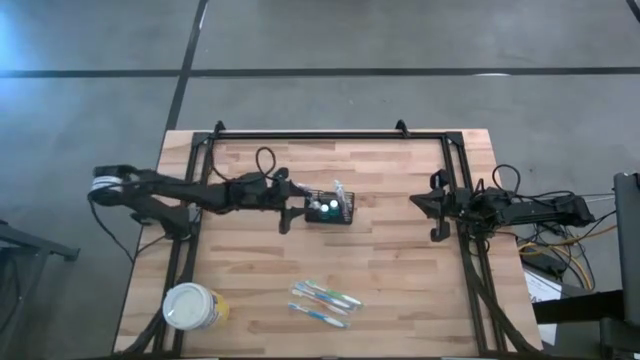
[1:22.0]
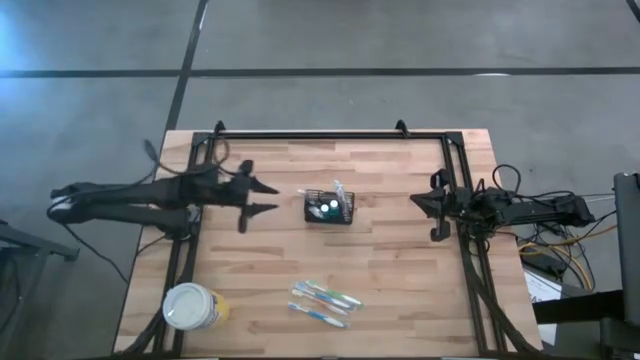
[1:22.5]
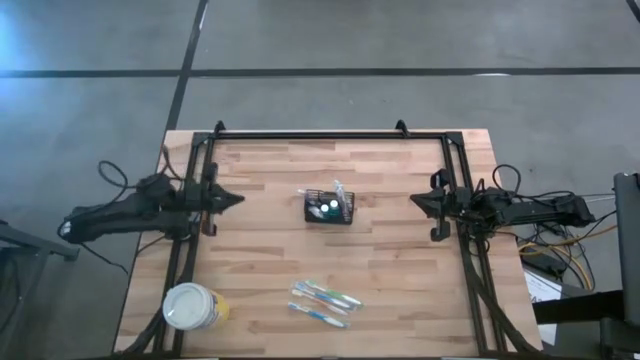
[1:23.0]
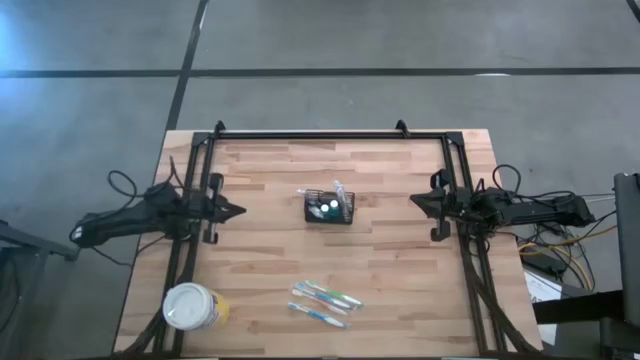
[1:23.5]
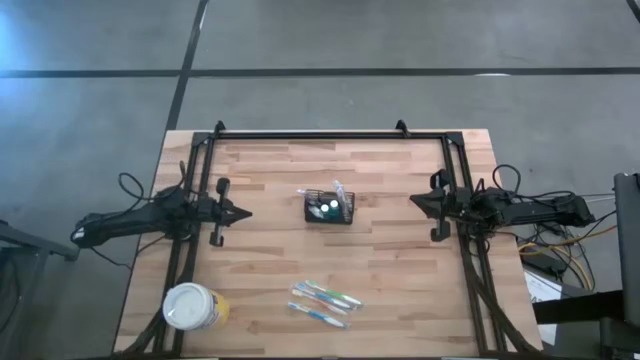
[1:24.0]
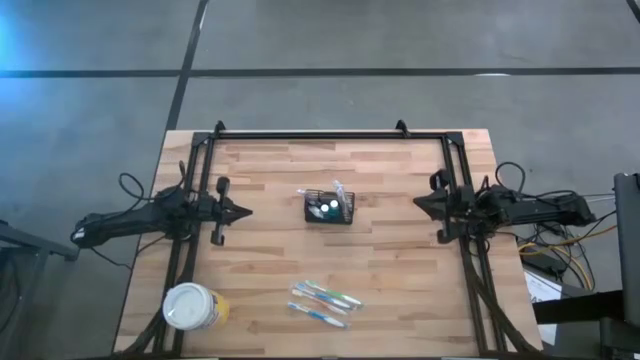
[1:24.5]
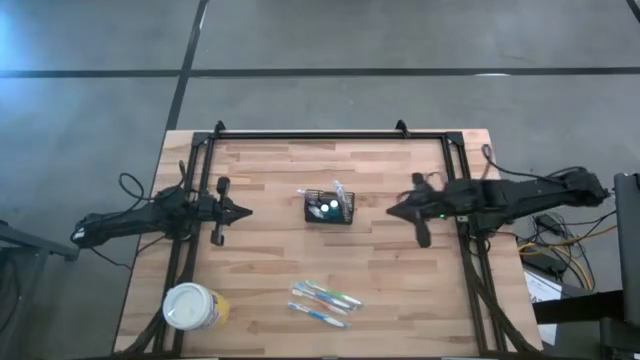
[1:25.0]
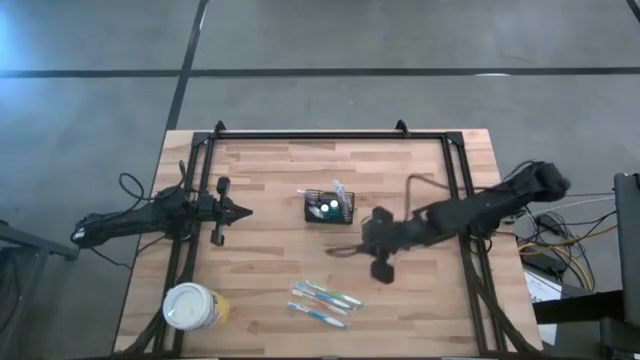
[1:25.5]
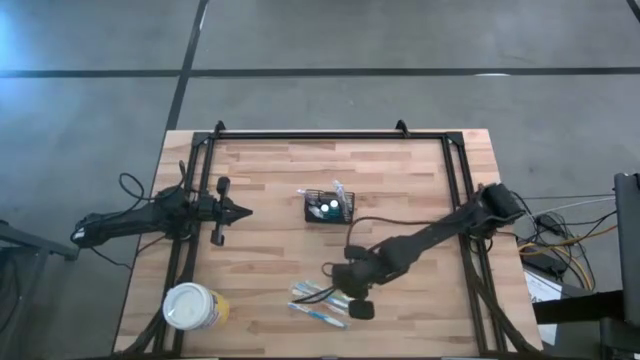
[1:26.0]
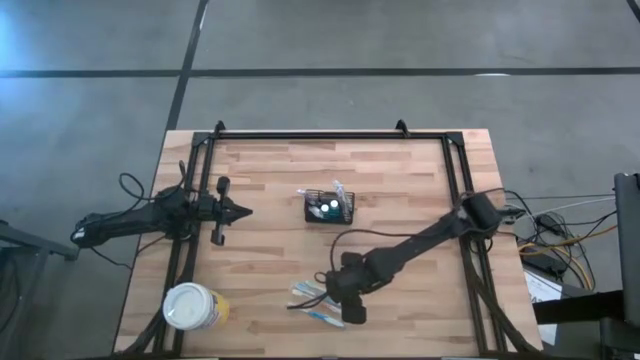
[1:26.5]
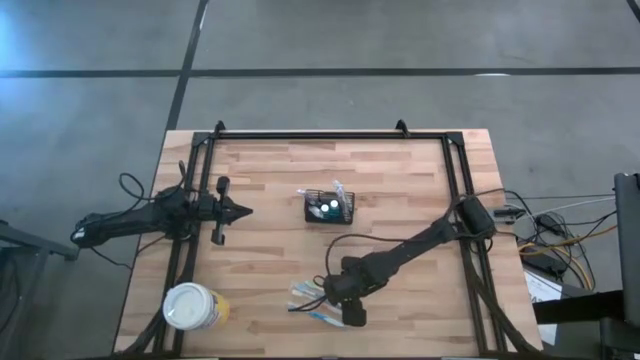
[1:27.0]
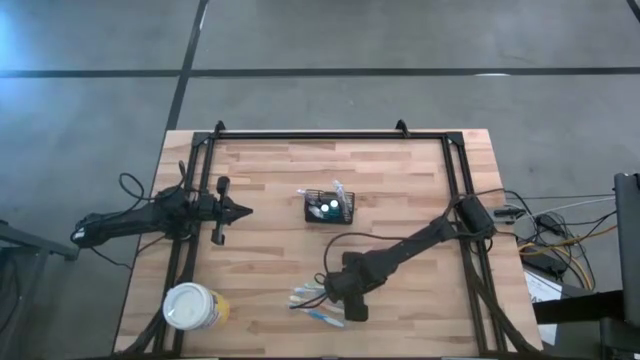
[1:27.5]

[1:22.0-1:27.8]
Task: Pick & Place toothbrushing station
Put the green toothbrush into the black organizer

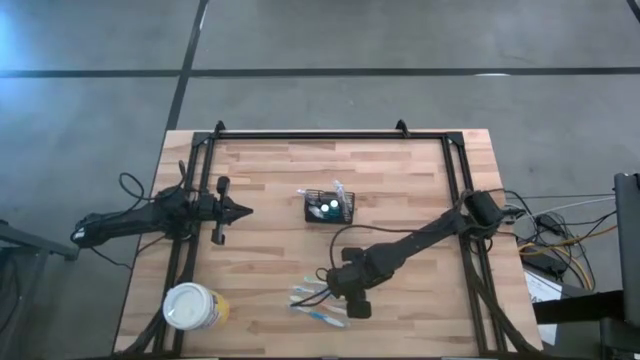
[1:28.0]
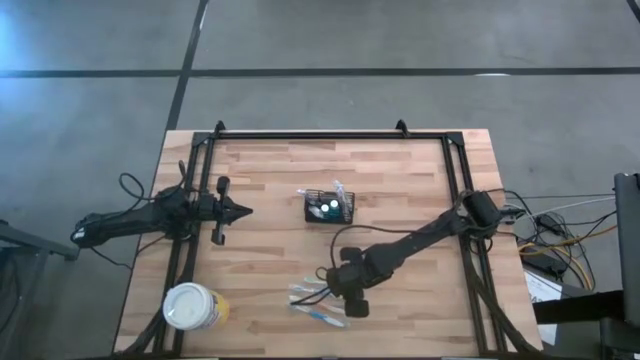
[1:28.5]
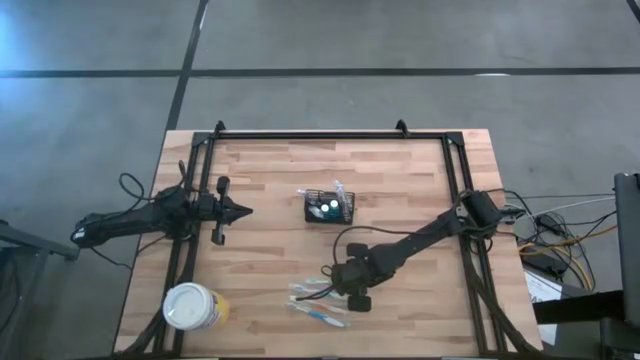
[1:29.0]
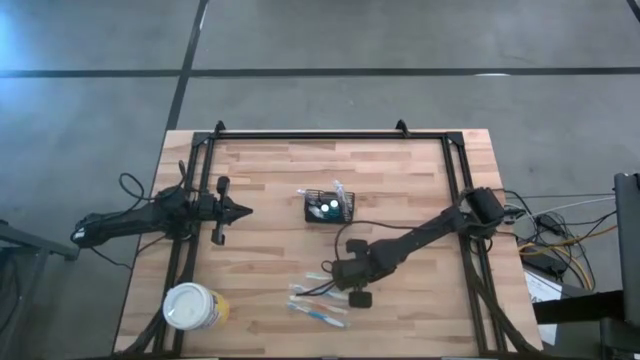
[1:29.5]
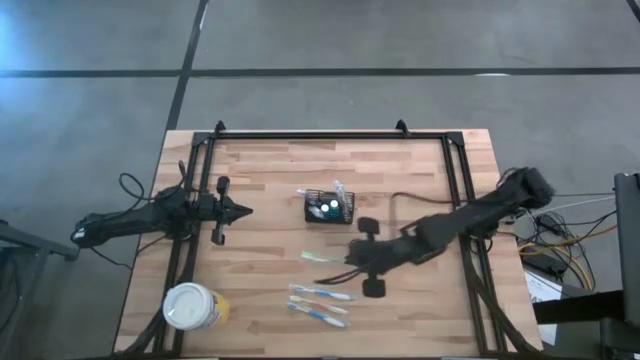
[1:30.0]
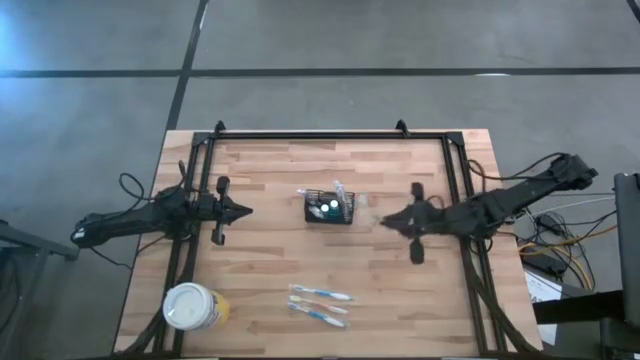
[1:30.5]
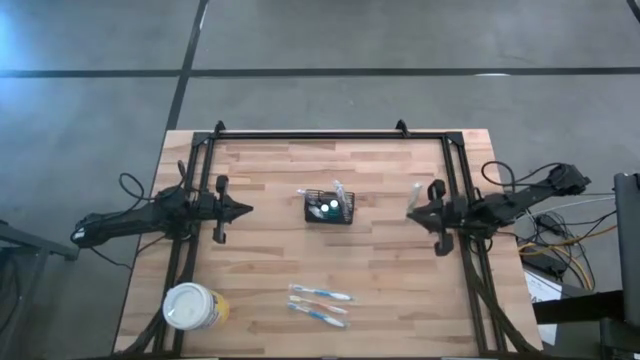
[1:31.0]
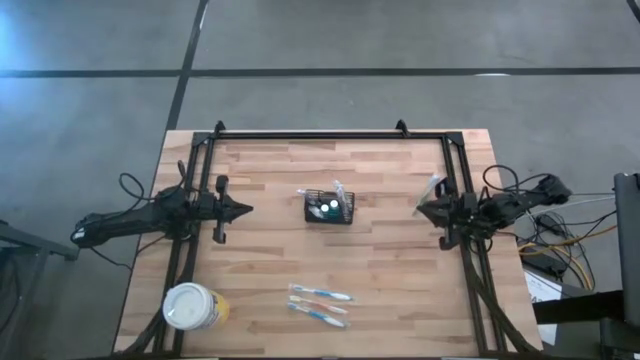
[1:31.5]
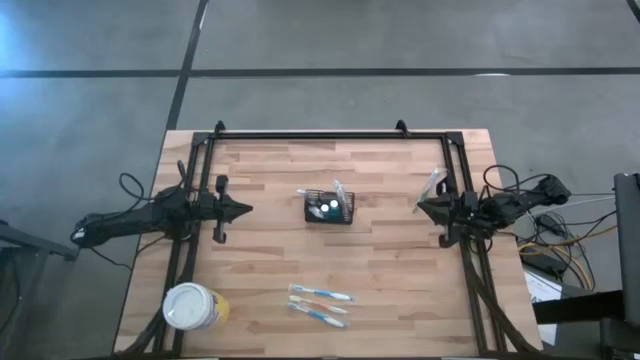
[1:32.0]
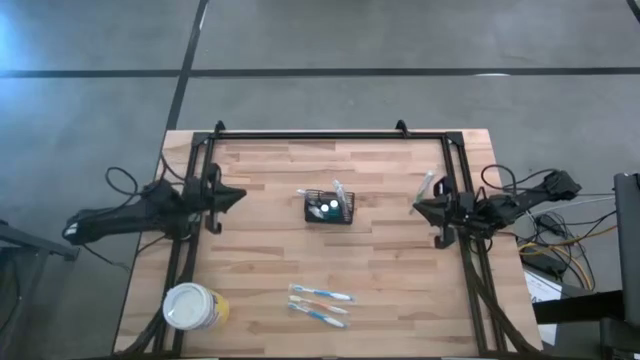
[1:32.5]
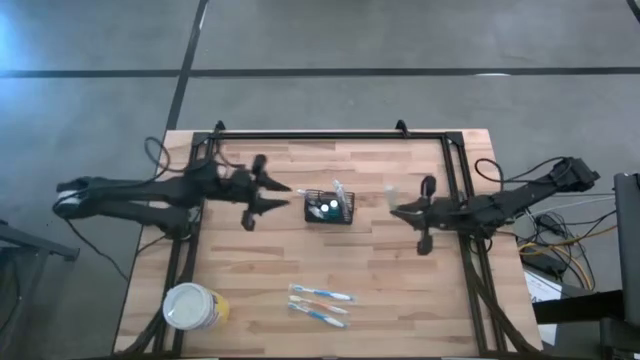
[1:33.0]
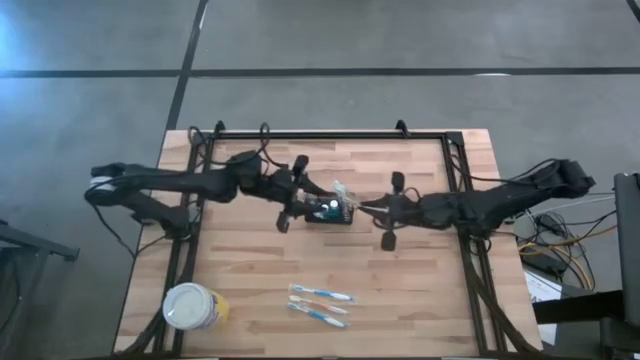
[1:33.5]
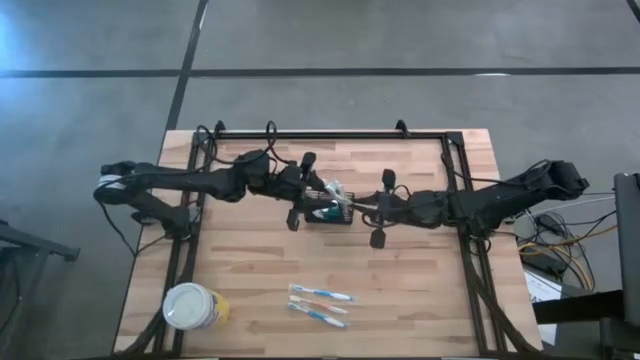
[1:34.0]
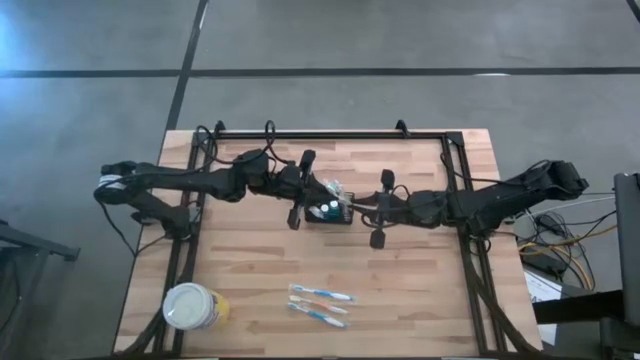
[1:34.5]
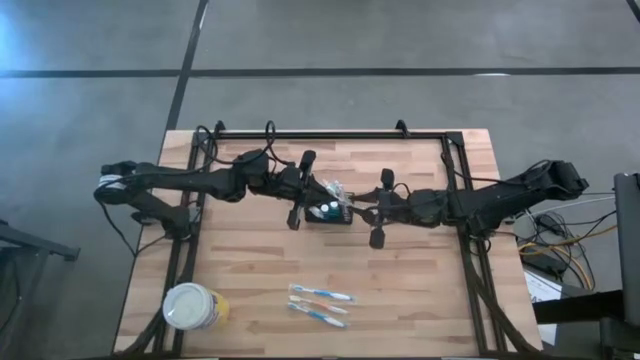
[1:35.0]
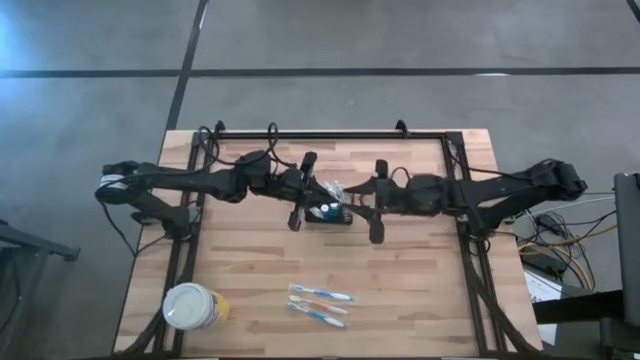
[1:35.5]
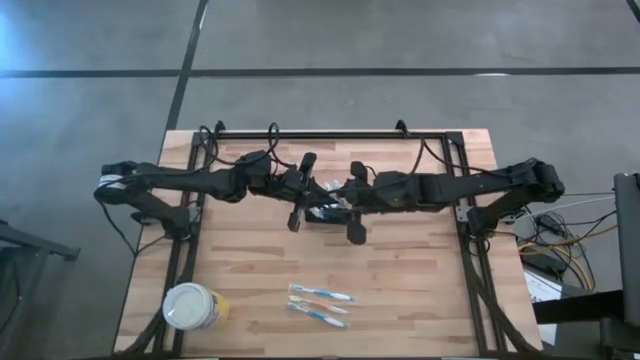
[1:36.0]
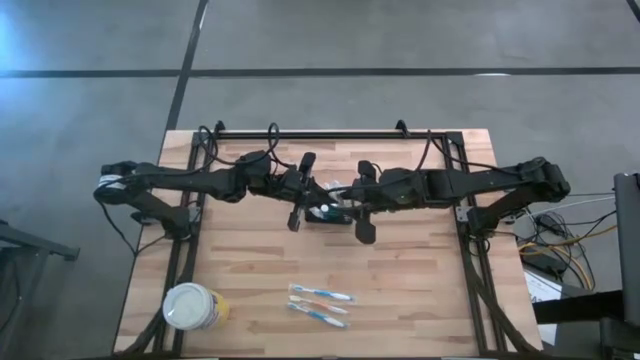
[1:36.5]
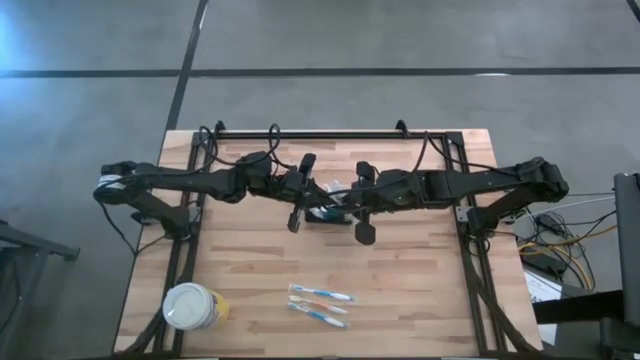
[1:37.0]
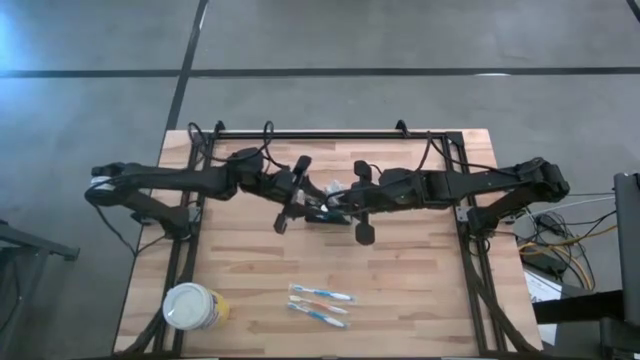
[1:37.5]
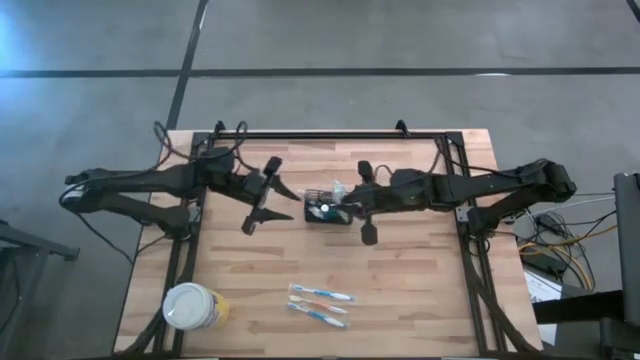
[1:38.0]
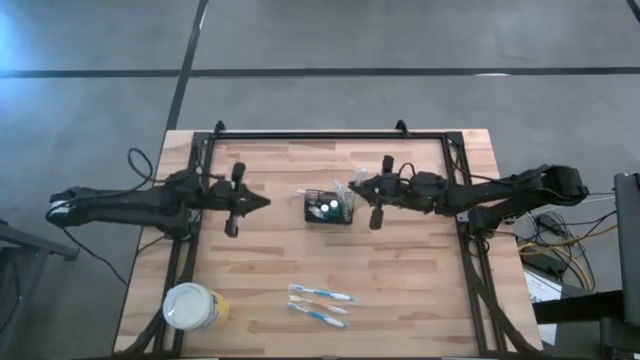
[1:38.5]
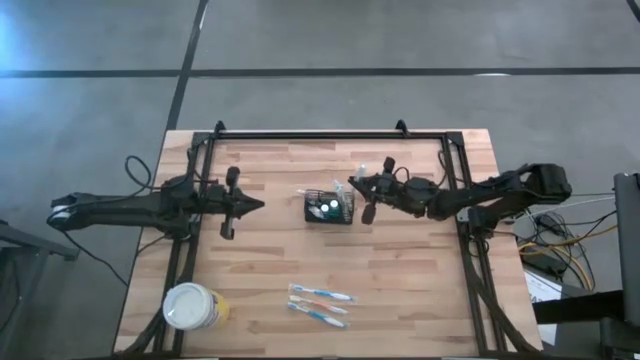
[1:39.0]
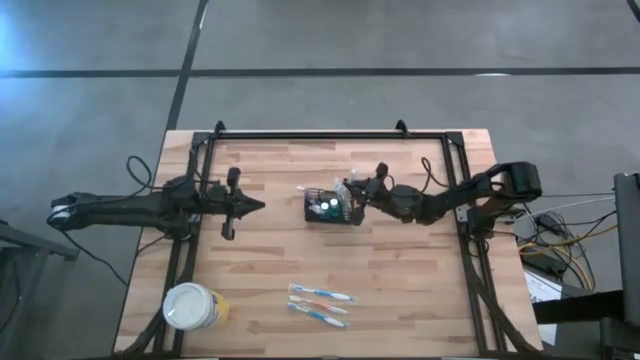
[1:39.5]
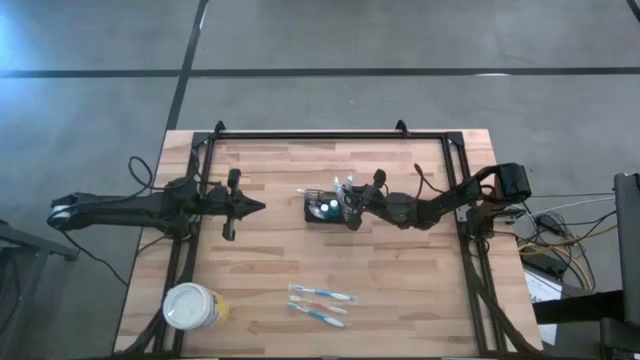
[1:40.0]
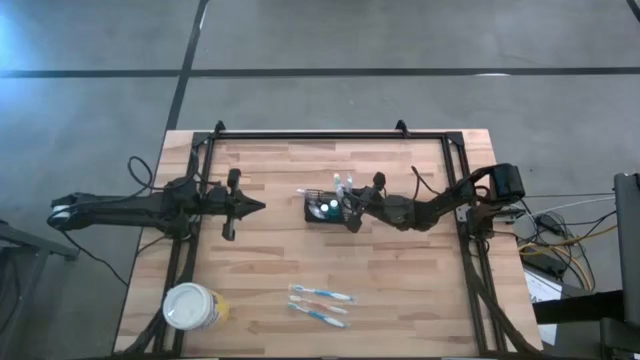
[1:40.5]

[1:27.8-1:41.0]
Put the green toothbrush into the black organizer

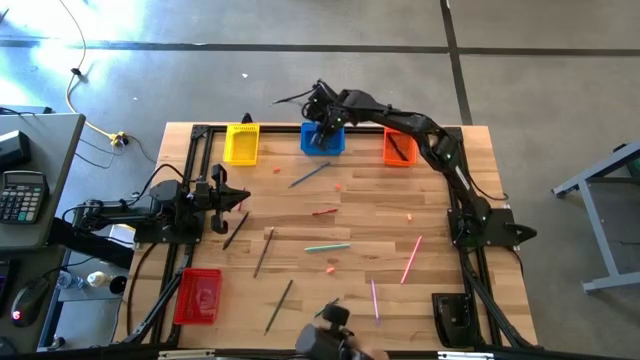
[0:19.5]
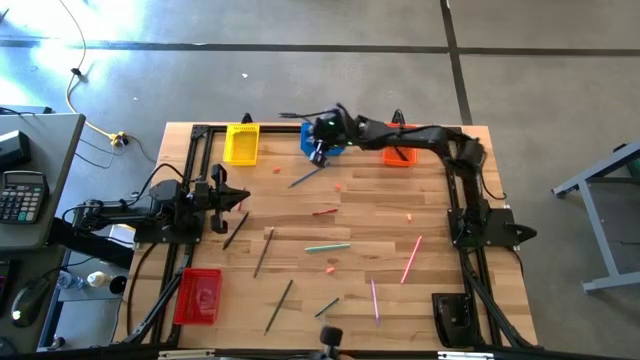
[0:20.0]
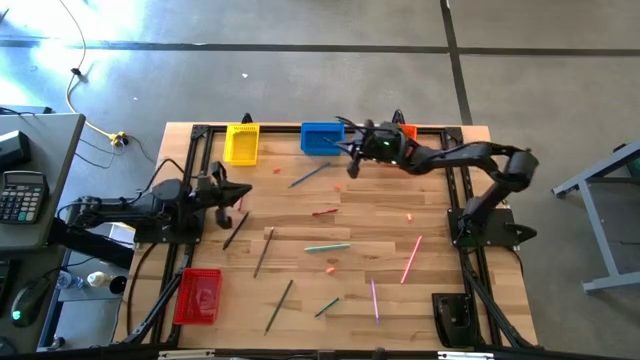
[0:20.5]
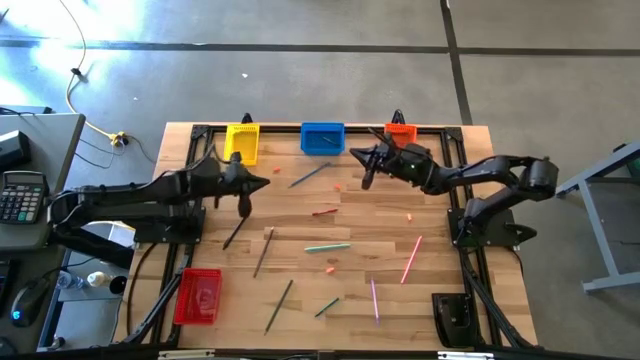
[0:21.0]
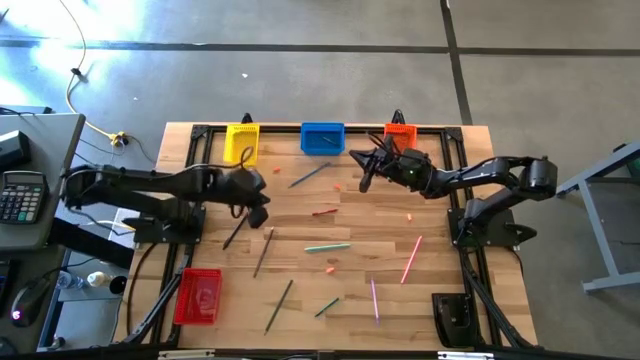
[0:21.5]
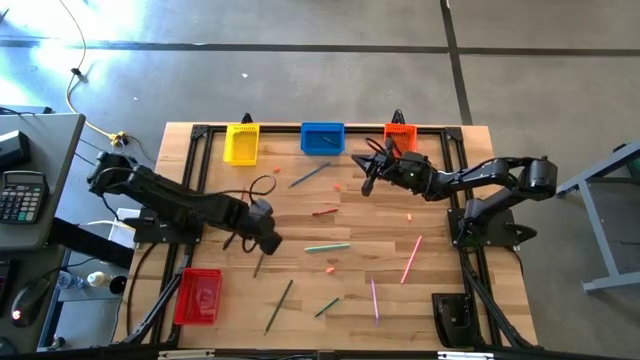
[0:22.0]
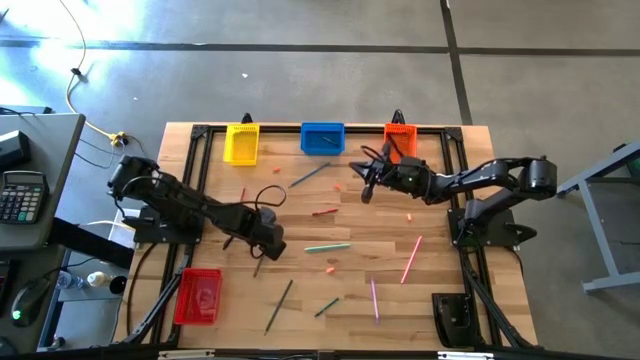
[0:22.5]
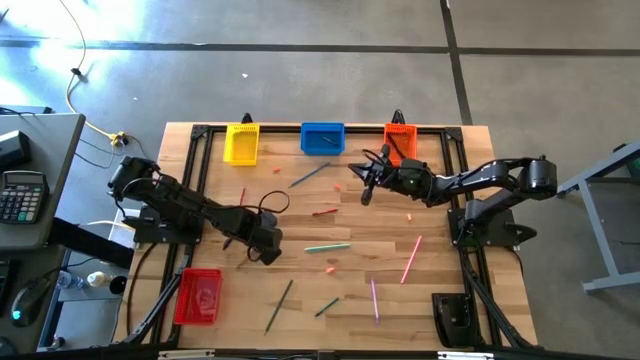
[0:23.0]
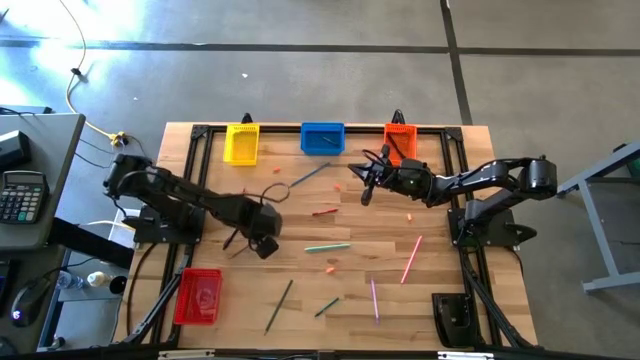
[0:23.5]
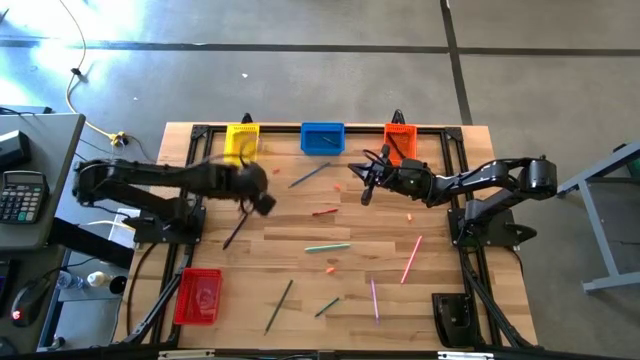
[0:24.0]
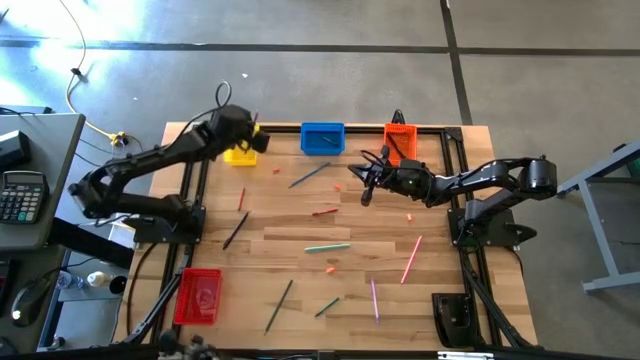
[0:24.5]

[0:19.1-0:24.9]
Task: Sort crayons/erasers/pens/pencils in bins
Put the black colored pencil into the yellow bin
